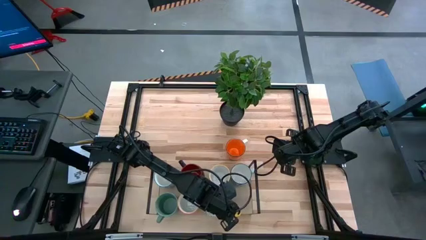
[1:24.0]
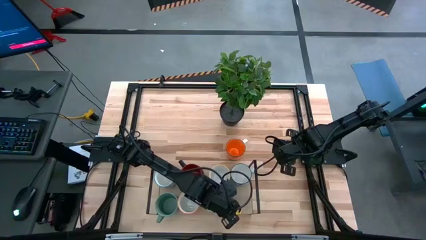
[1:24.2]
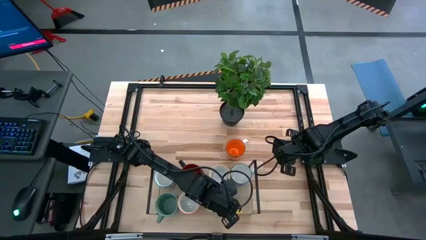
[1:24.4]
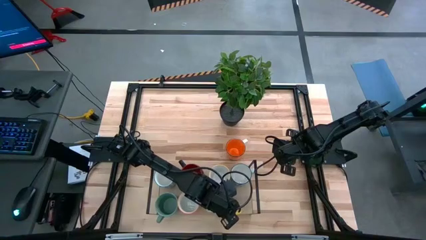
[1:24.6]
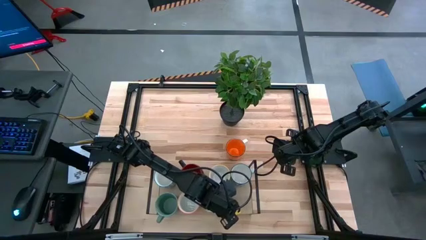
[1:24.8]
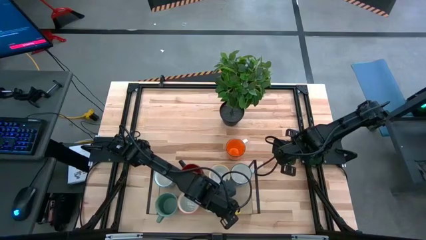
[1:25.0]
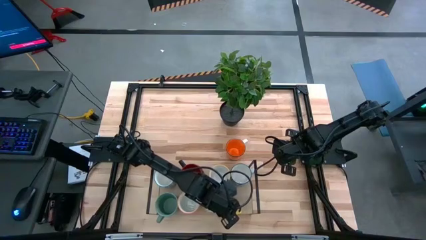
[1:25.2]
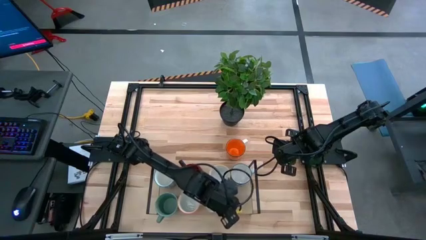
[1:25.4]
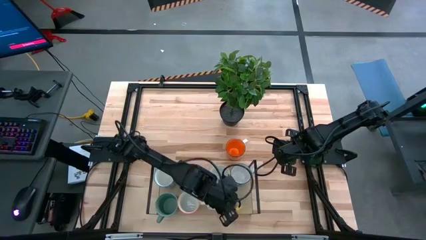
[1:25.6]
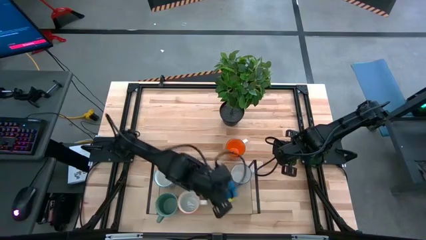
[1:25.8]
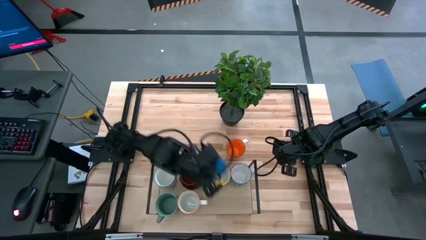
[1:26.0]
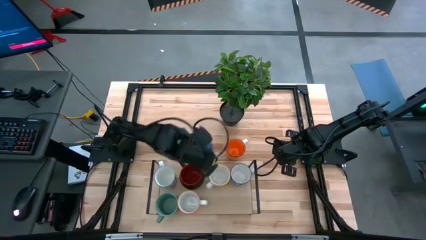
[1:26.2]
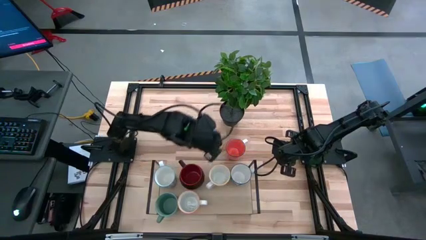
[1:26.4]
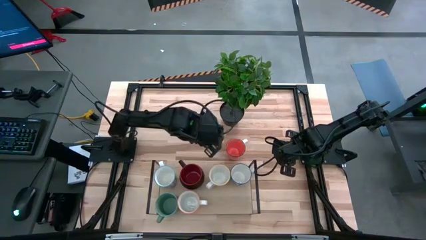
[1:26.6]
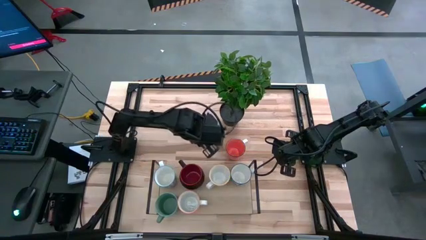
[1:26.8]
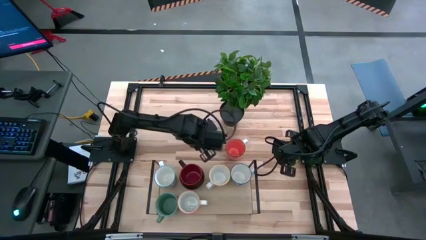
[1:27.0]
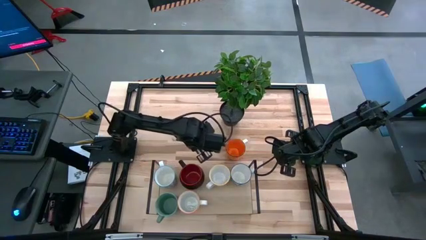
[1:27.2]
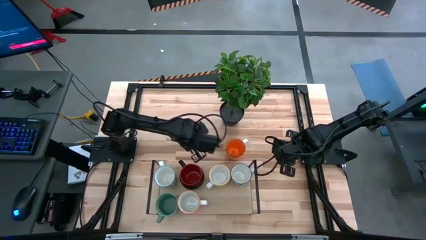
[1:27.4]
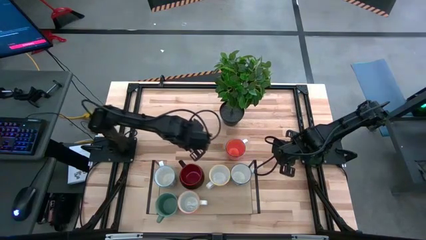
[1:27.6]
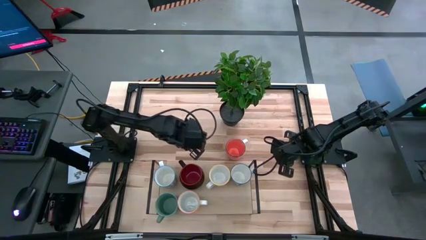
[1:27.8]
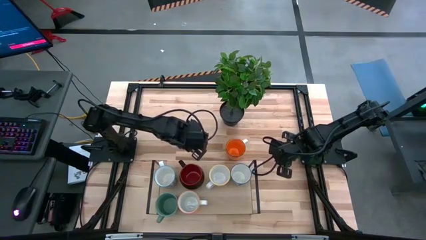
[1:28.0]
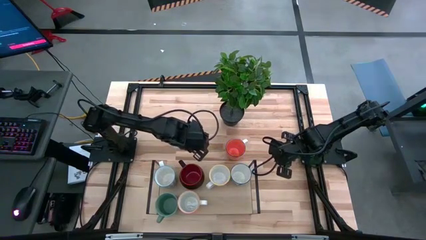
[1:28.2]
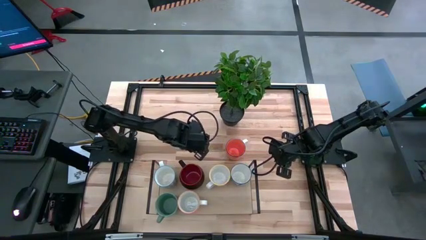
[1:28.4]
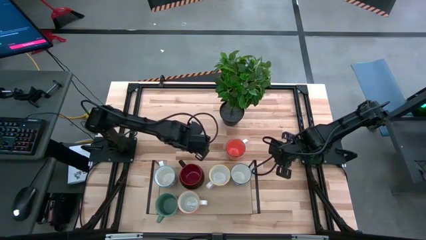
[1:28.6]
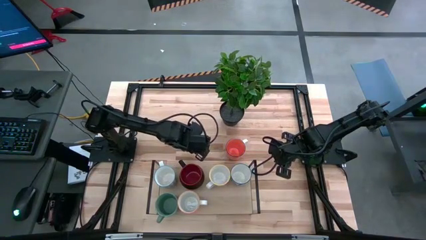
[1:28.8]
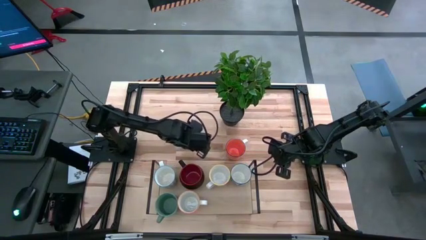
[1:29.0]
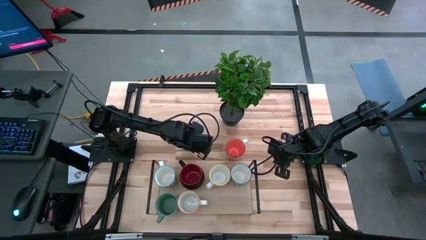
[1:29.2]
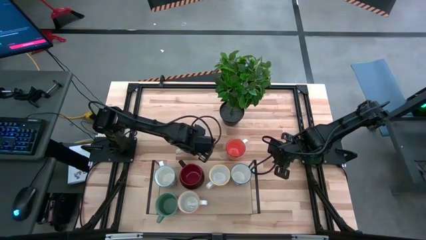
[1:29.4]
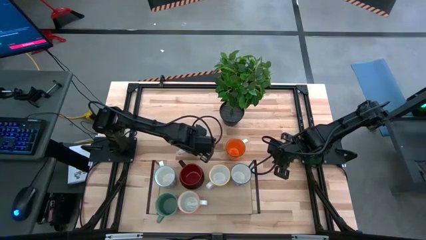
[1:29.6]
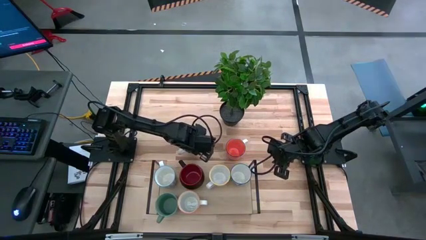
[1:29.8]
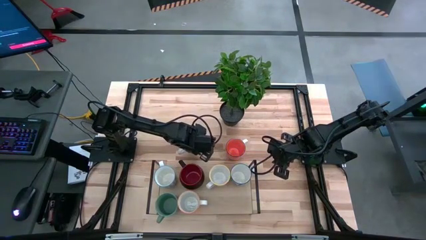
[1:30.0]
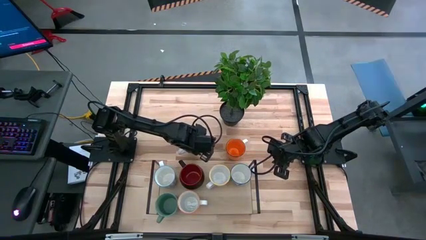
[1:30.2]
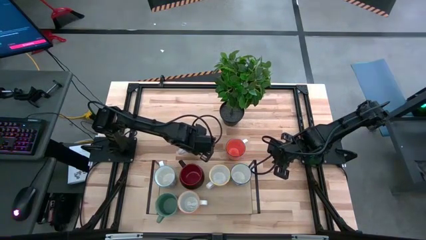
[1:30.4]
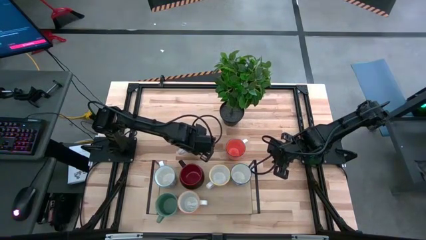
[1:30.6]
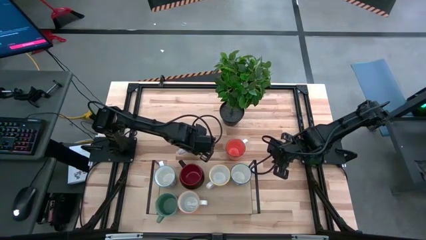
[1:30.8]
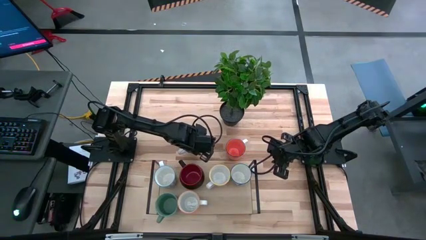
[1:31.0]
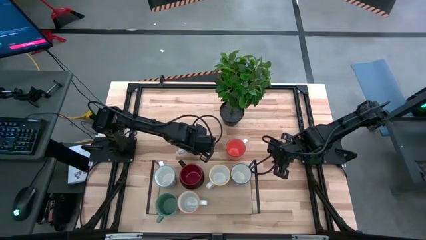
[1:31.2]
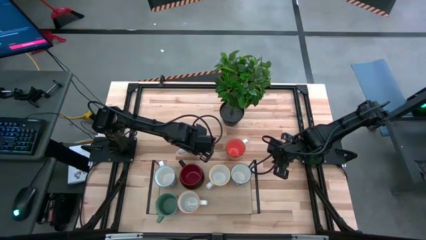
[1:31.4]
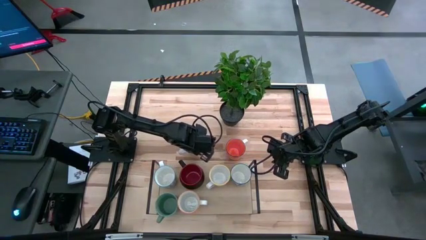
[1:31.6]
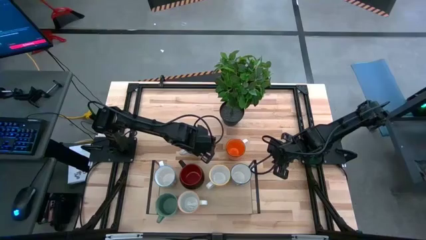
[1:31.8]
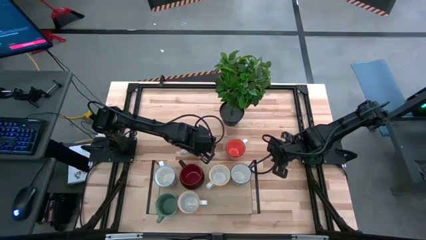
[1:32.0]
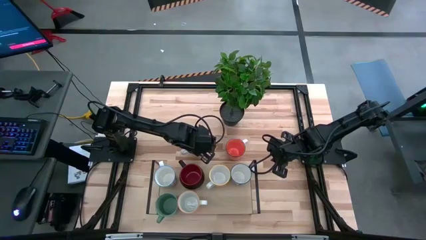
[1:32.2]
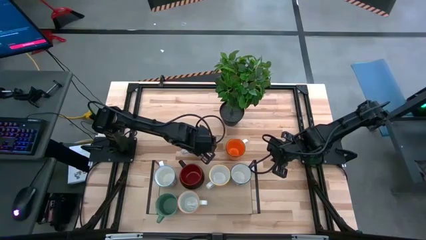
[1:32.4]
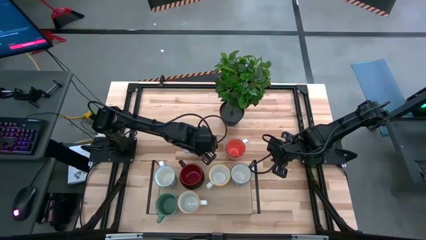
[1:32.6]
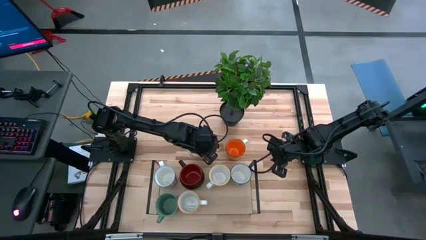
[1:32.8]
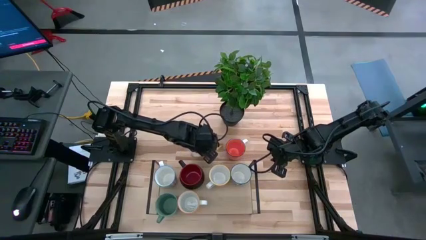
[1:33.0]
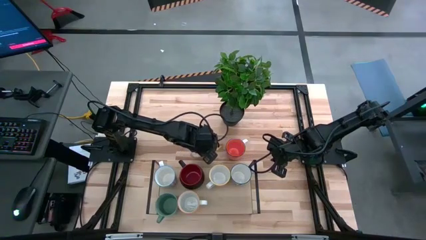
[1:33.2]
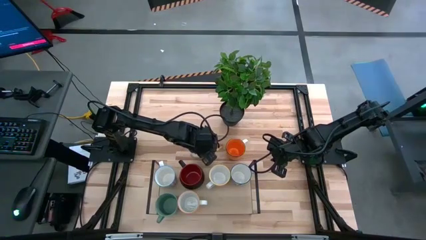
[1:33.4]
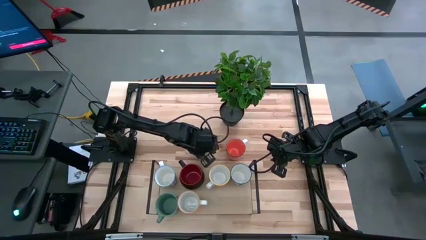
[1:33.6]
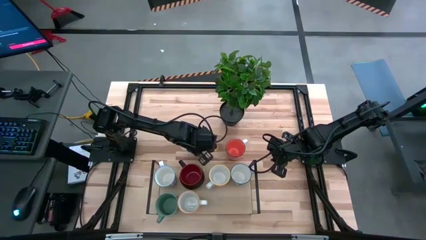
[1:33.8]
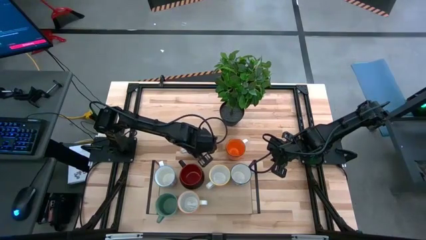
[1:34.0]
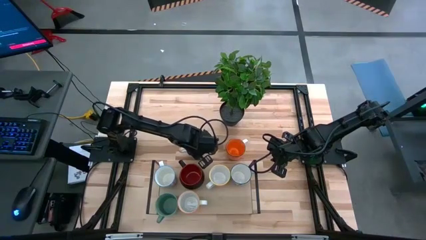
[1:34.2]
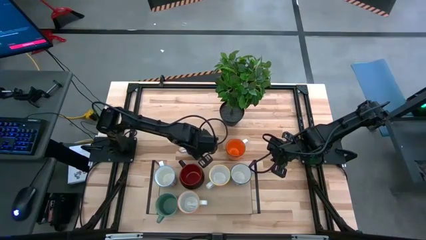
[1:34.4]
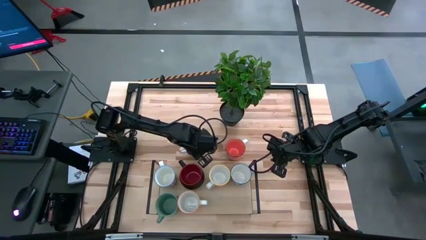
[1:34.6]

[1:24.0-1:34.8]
Task: Place coffee mugs
Put the blue mug on the shelf

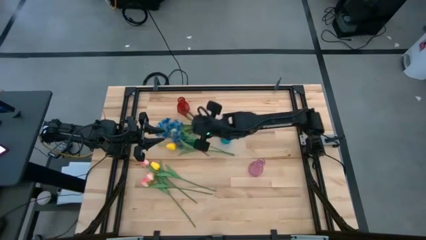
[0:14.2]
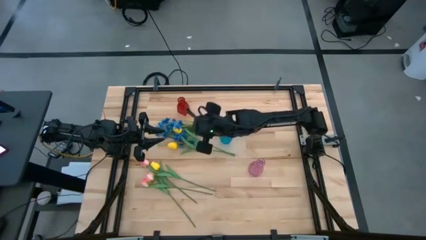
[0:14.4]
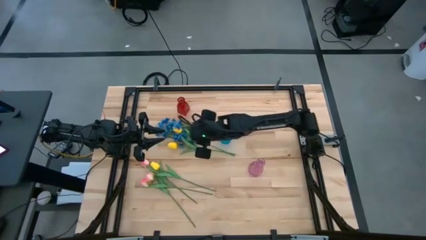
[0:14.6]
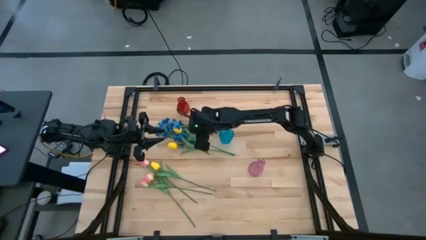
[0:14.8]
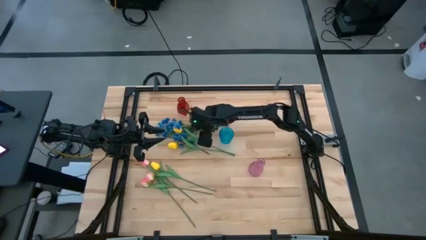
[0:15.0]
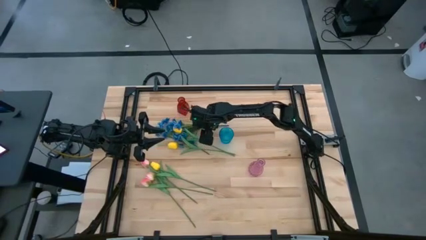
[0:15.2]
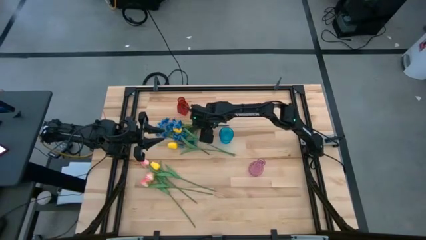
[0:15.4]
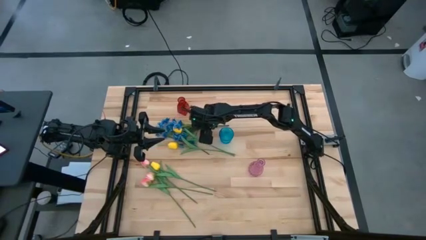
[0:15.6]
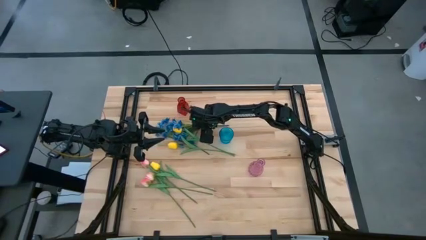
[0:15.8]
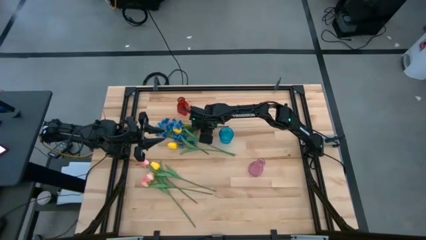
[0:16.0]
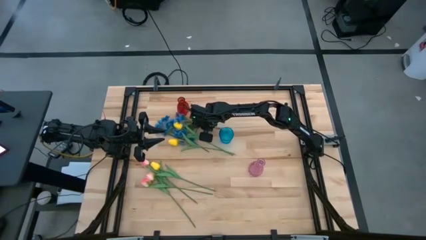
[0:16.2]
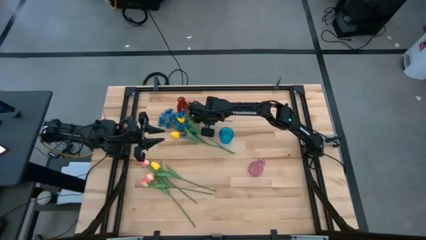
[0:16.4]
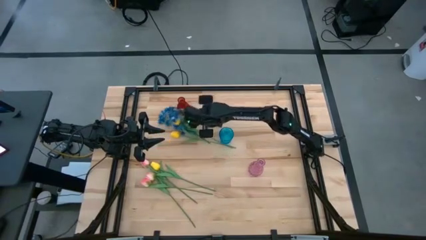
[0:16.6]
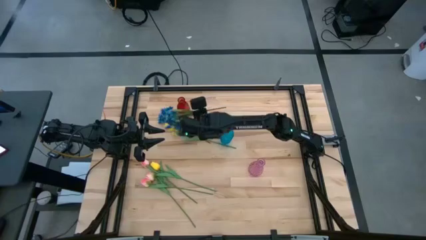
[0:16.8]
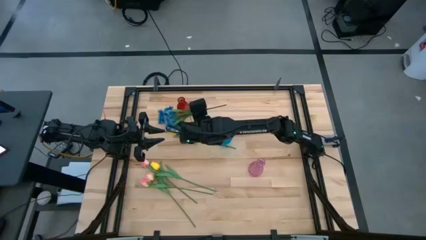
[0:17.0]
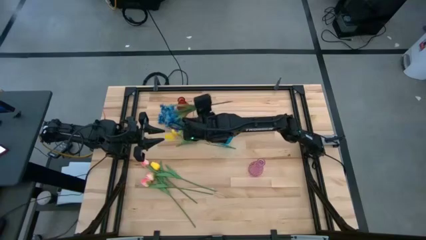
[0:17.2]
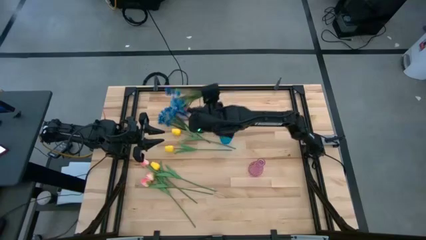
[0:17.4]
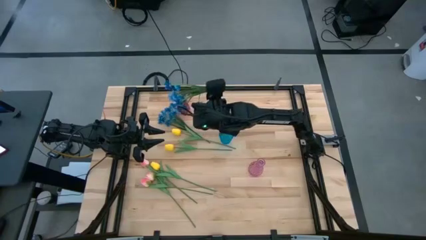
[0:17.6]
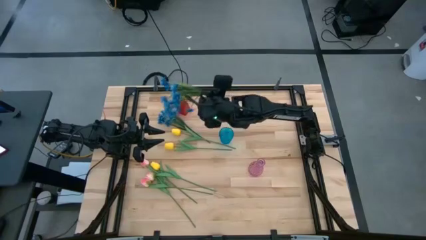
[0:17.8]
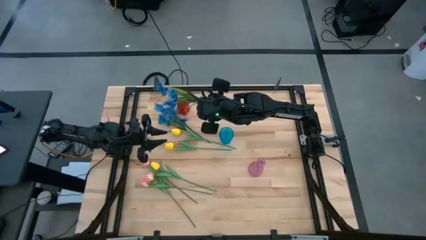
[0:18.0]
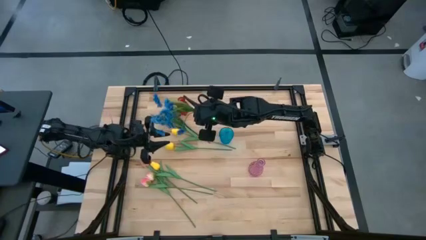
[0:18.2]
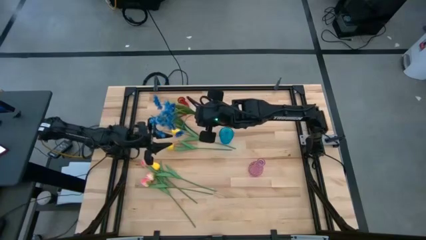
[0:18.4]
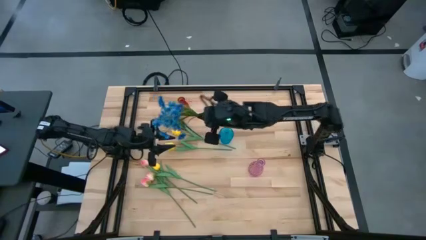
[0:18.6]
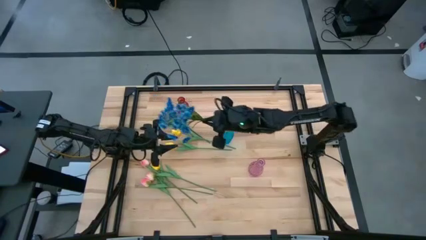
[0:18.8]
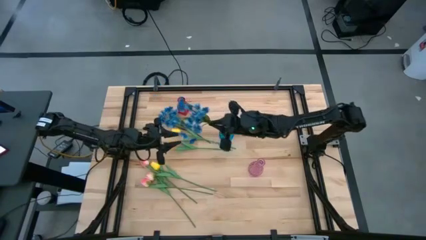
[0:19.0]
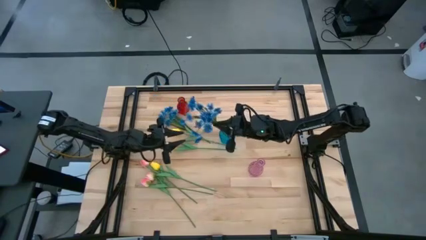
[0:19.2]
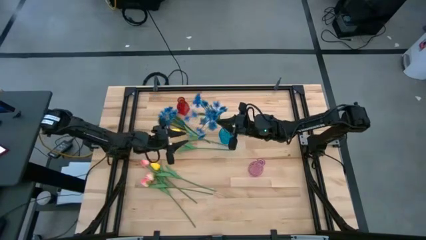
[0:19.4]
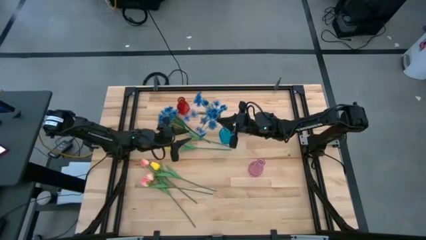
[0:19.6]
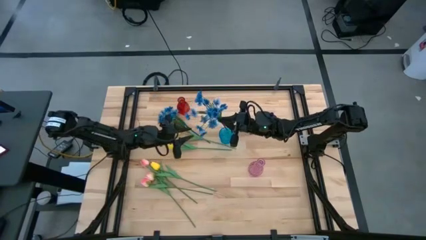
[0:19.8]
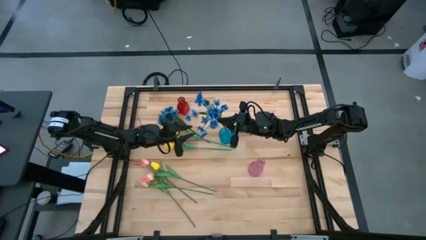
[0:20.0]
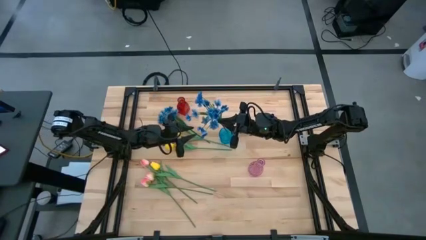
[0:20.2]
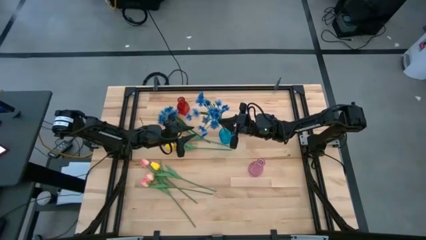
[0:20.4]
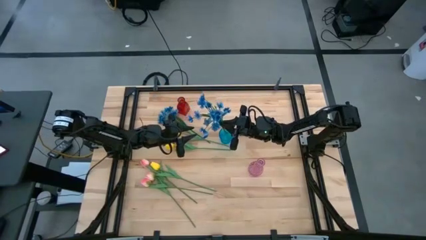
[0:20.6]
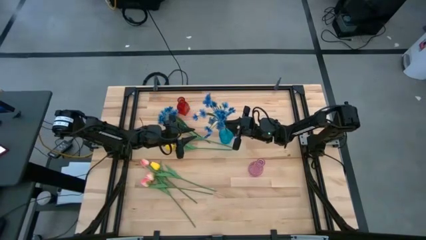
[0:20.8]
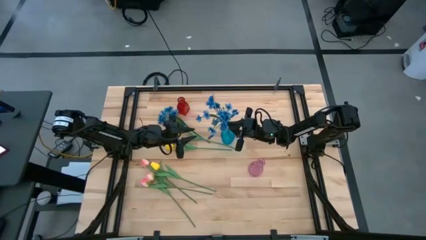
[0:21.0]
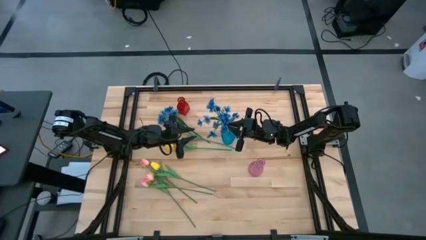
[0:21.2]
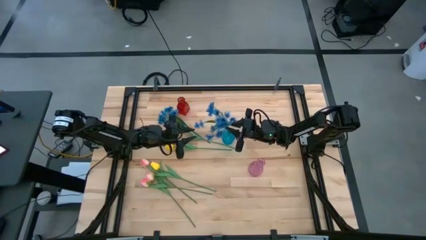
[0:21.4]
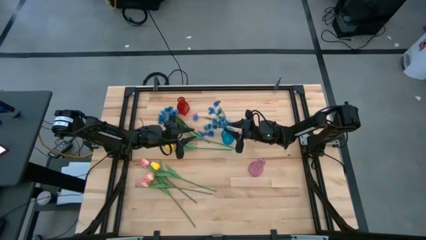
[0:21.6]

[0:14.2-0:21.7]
Task: Sort flowers into vase by color
Put the left blue flower into the blue flower vase
